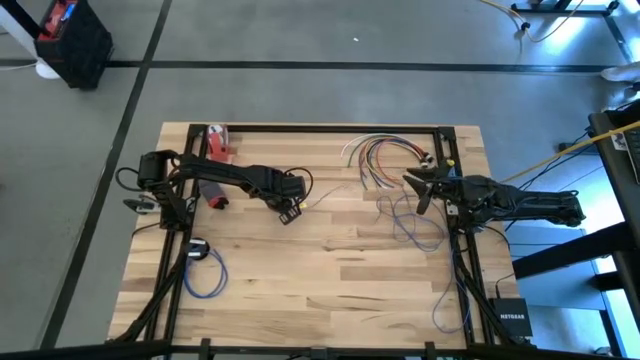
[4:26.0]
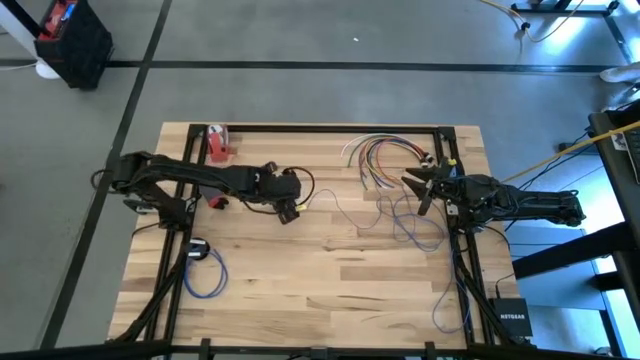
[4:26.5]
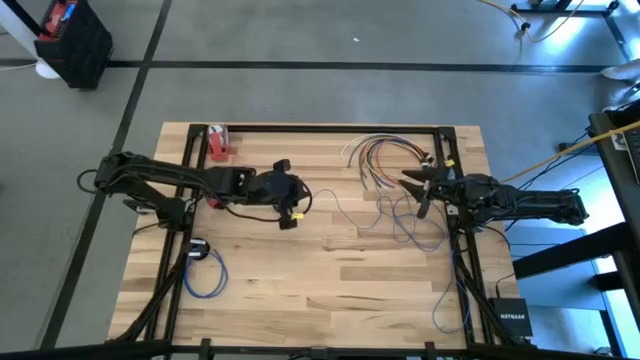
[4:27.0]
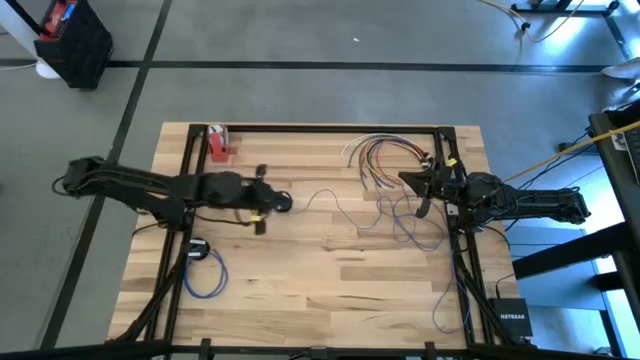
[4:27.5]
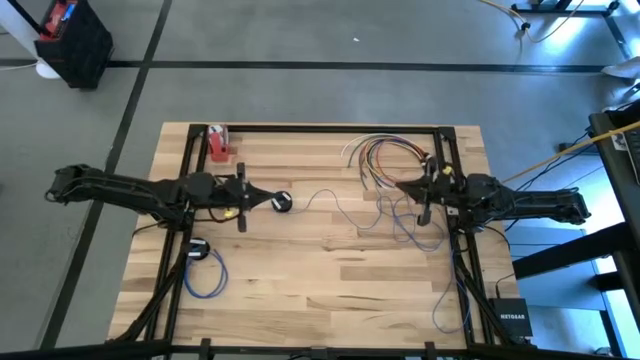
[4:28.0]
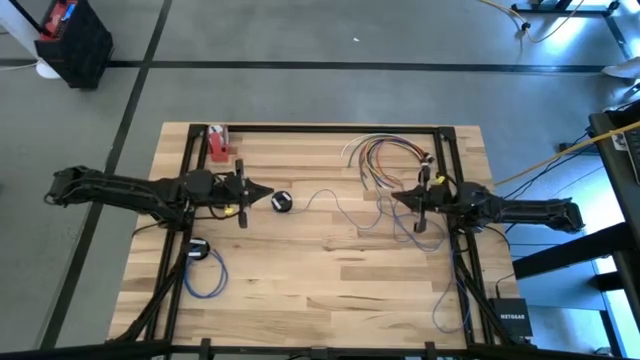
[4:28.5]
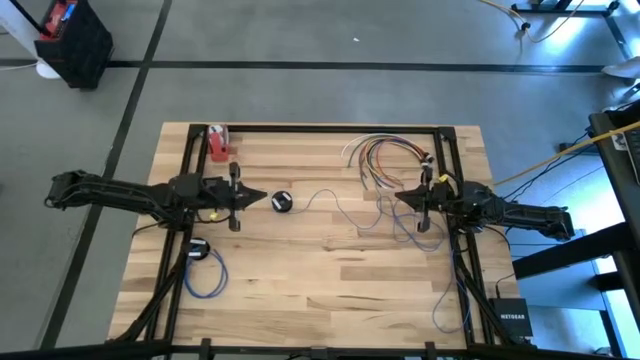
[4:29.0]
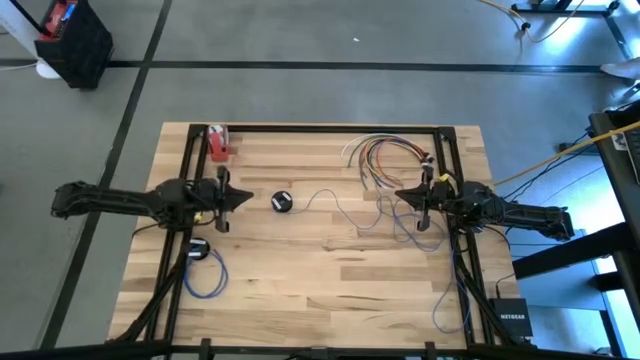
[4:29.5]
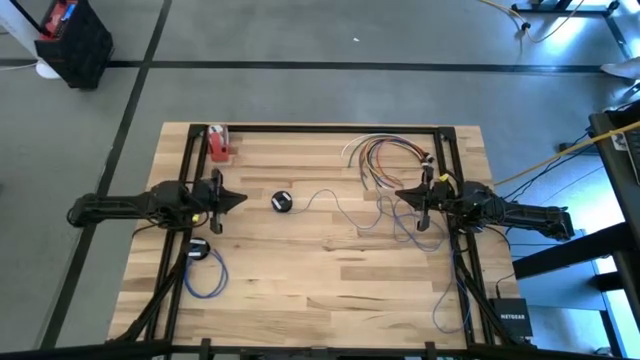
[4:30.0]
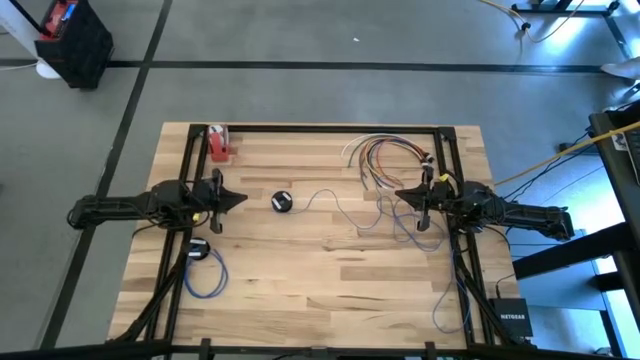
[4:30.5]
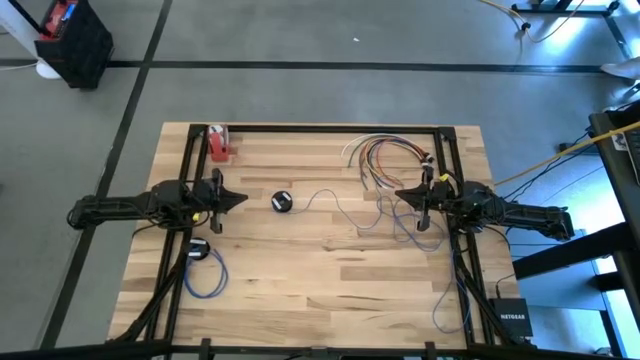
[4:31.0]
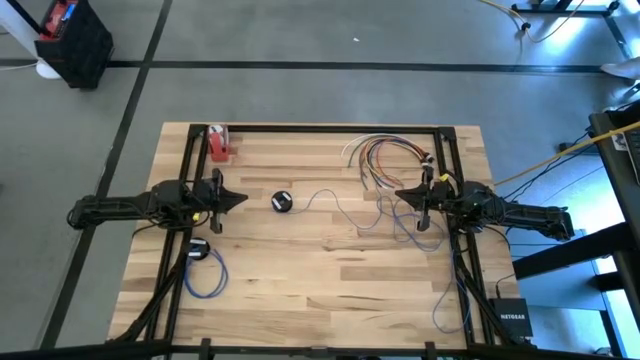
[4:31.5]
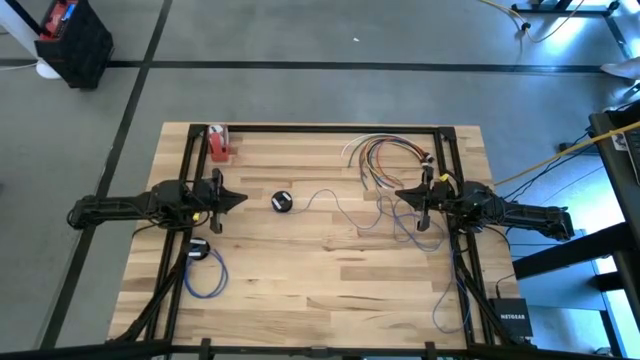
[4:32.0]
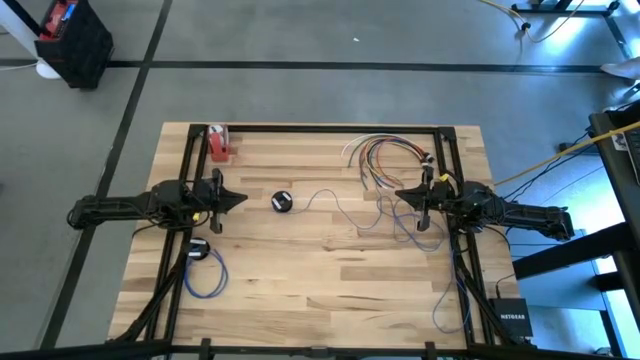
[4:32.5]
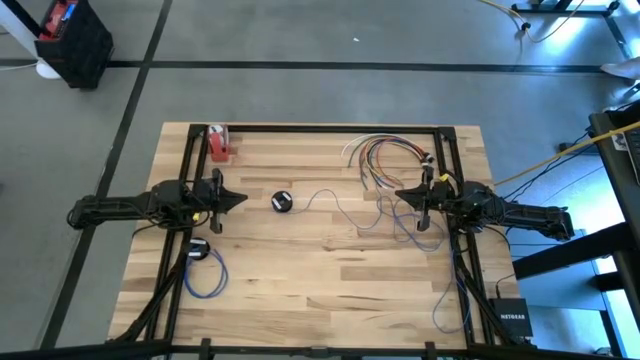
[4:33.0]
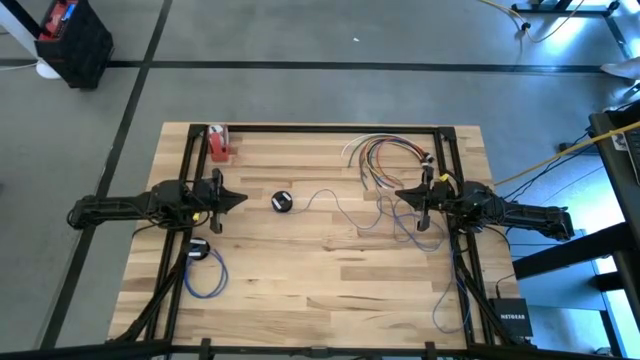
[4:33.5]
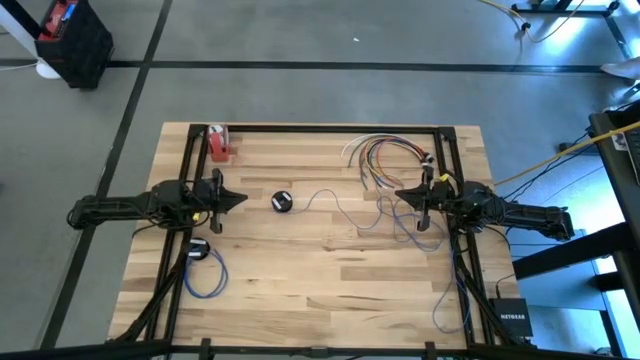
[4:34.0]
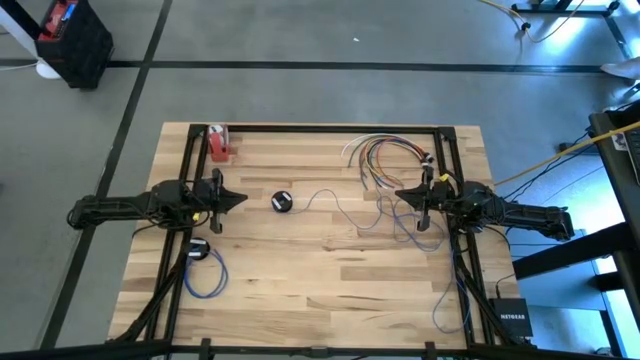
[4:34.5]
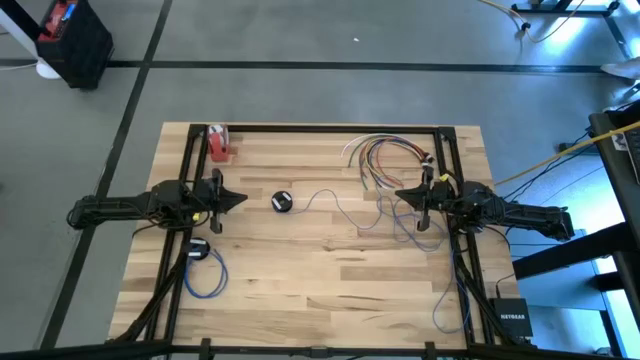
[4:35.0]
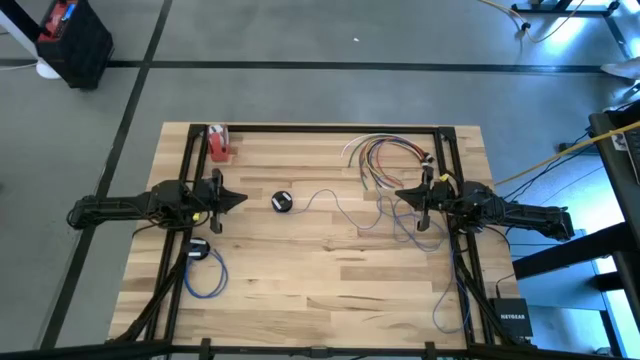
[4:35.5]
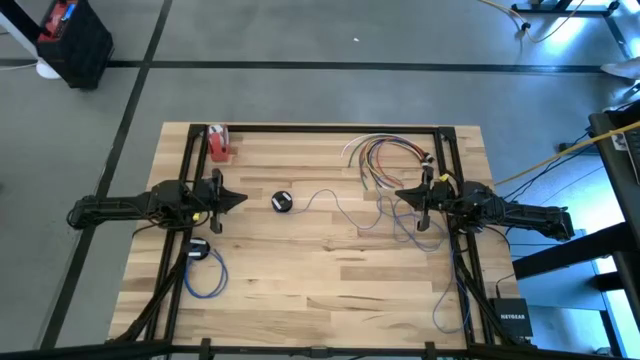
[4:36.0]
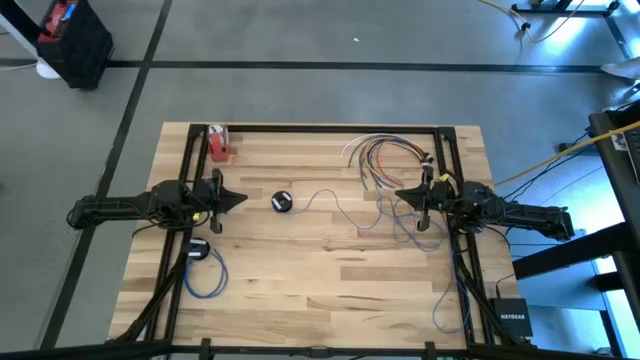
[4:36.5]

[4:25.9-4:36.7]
Task: Coil cords
Return to Home Position

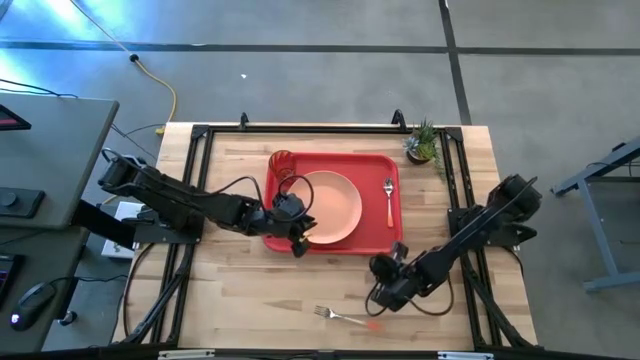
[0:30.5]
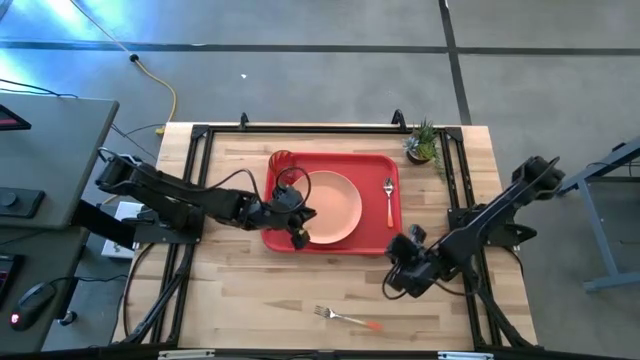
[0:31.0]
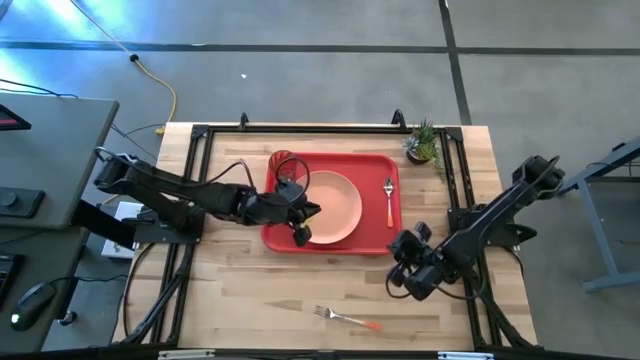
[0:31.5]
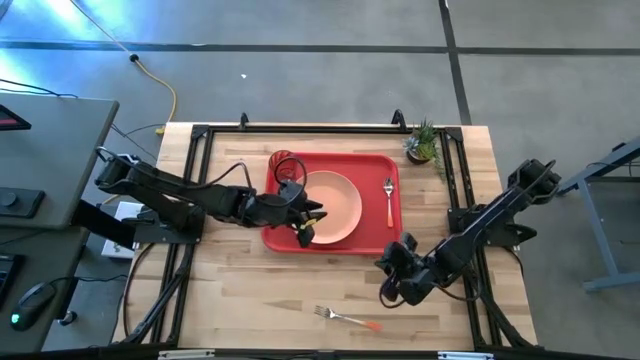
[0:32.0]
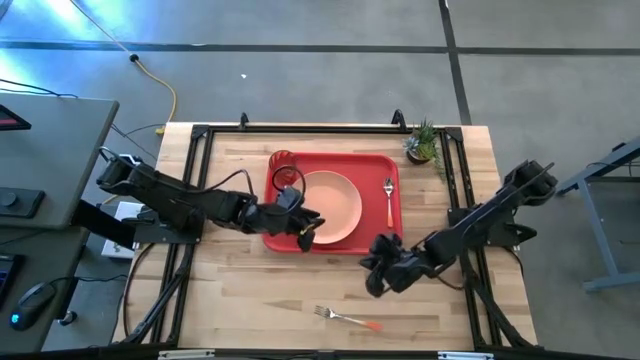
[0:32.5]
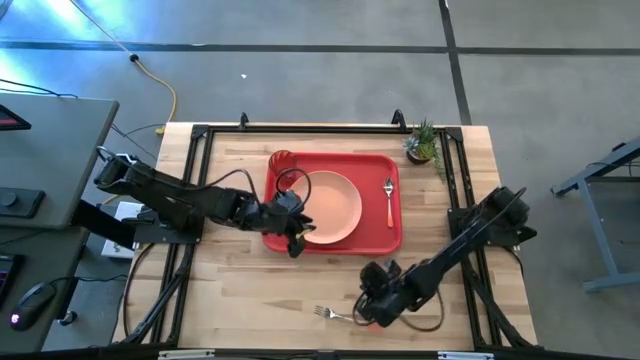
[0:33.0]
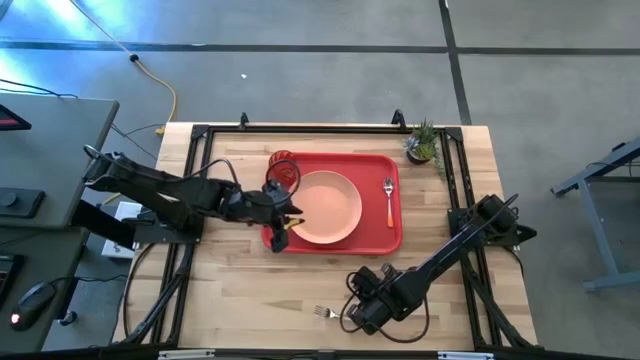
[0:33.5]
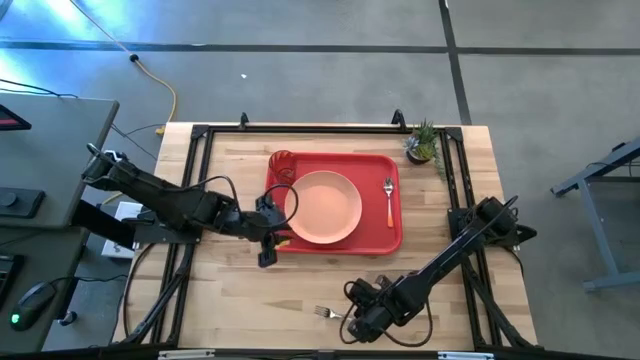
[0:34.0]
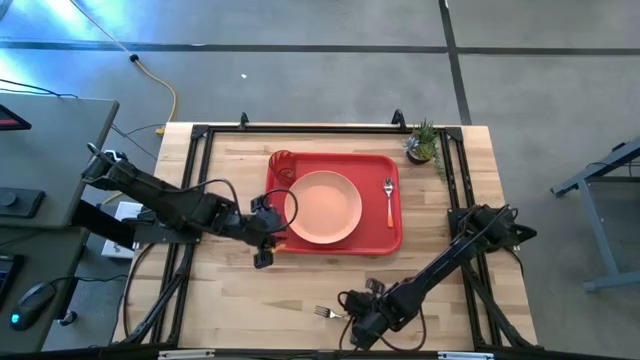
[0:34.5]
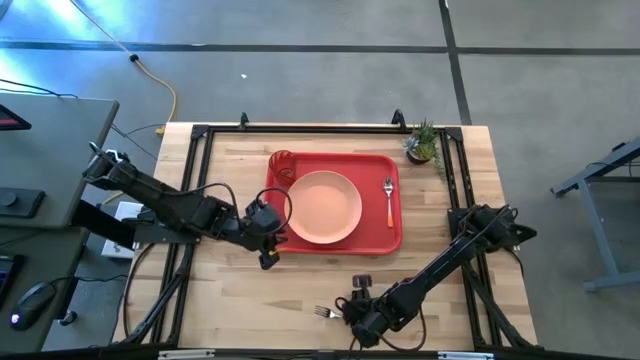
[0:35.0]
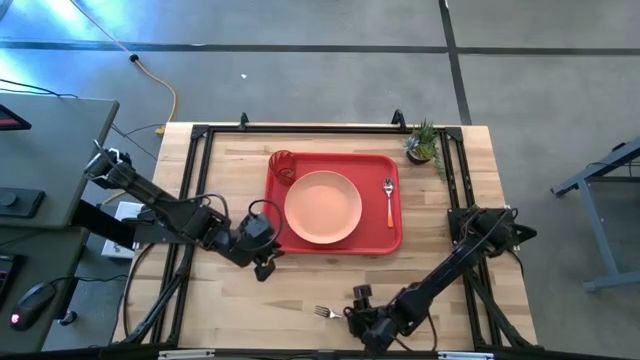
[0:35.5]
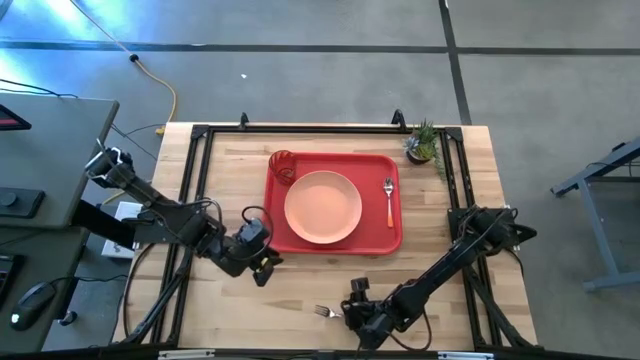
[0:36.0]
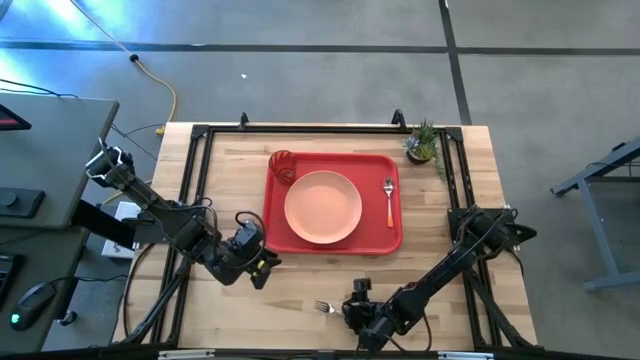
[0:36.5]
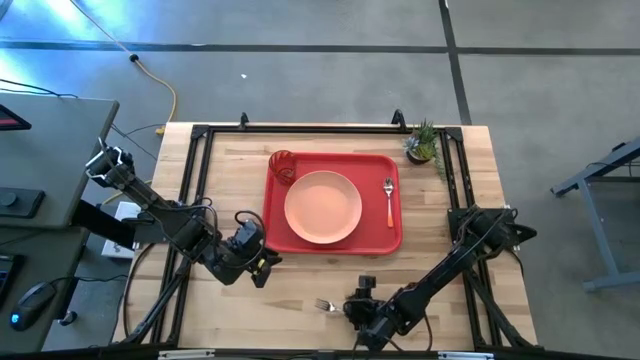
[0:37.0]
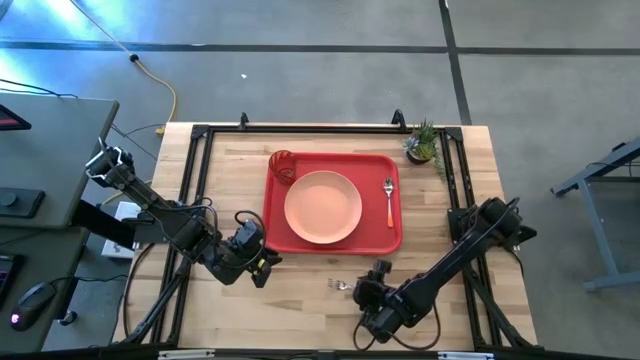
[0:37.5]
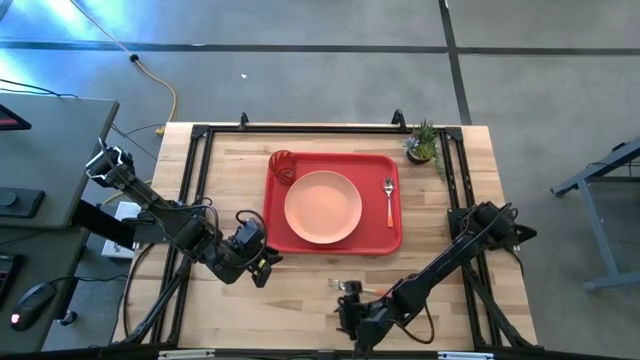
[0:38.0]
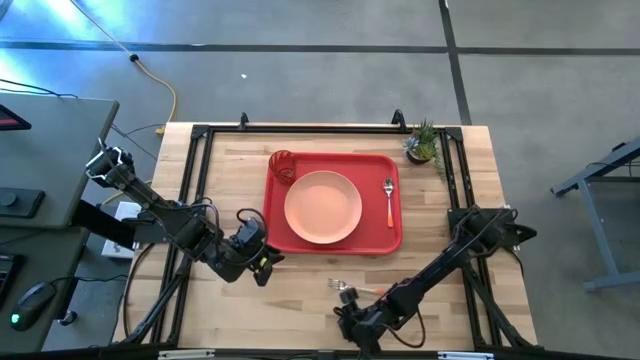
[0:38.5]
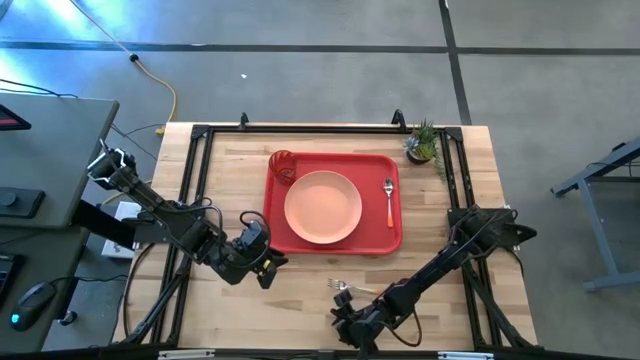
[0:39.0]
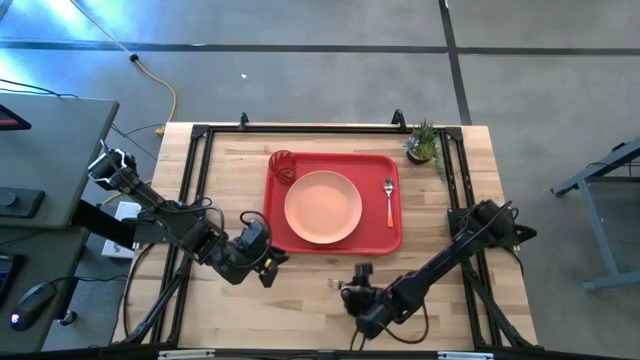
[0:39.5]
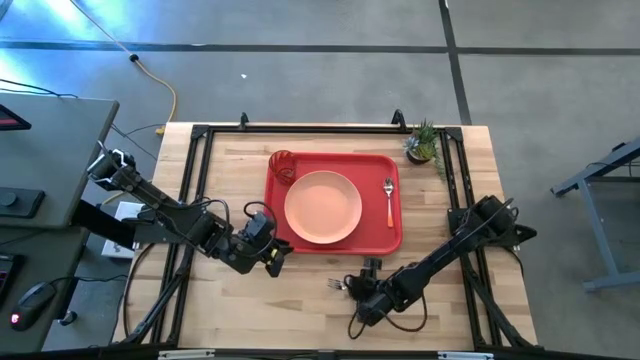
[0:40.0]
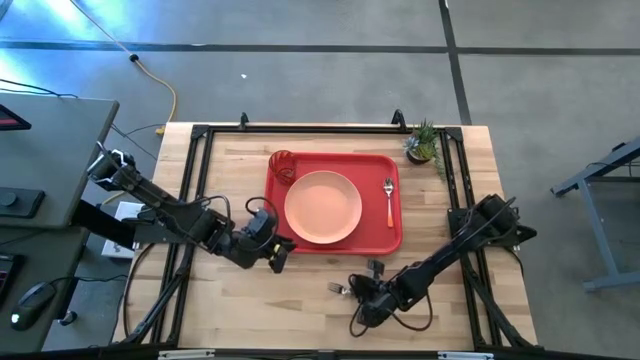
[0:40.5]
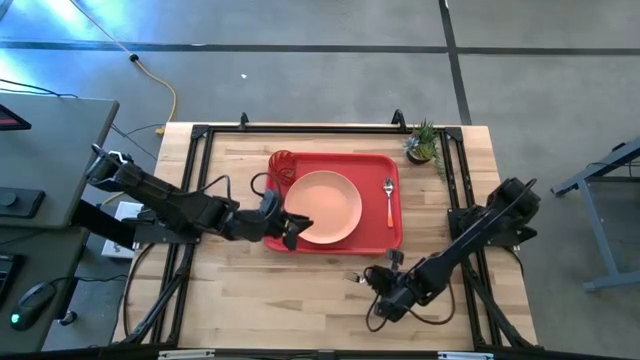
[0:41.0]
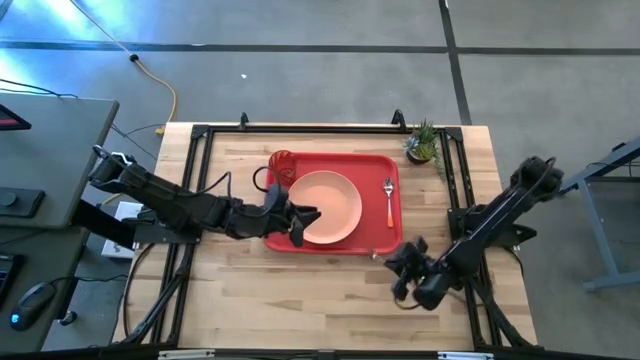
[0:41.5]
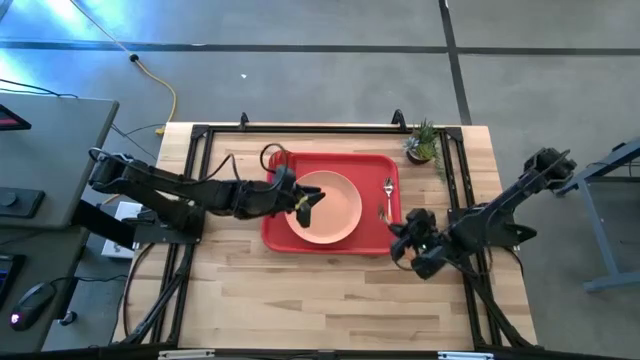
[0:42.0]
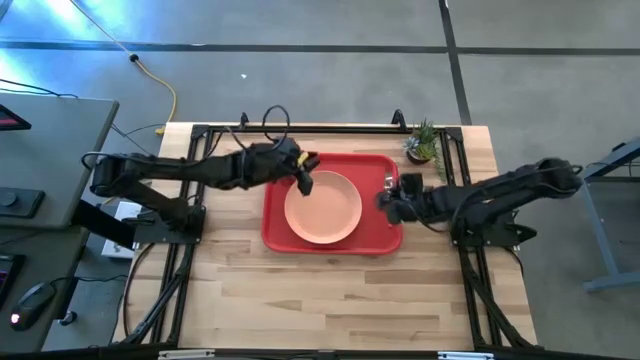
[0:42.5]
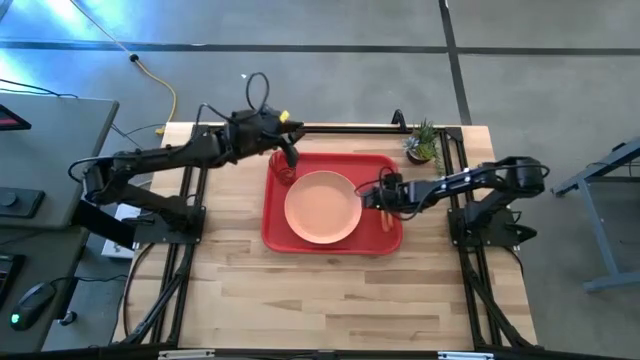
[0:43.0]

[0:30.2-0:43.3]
Task: Pick and place plate/cup/fork/spoon on tray
Put the orange fork on the red tray to the right of the orange plate
